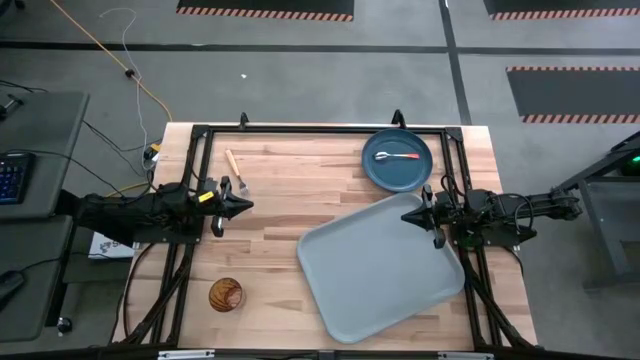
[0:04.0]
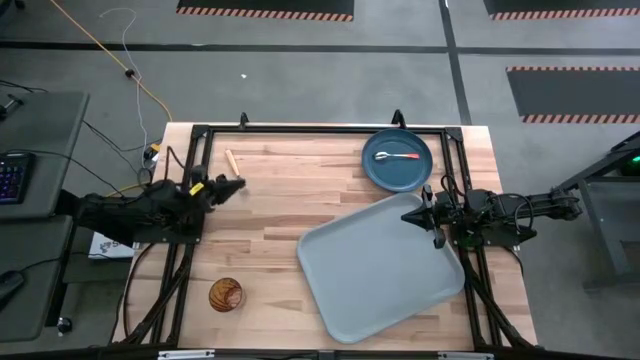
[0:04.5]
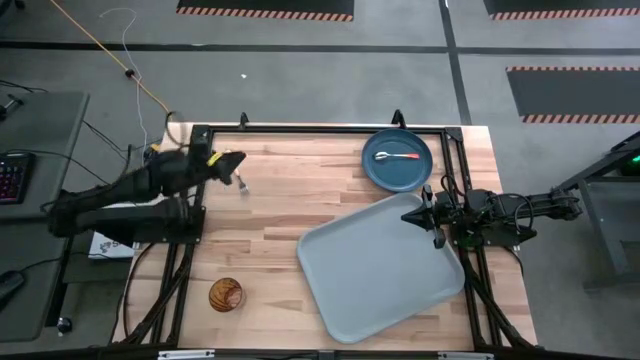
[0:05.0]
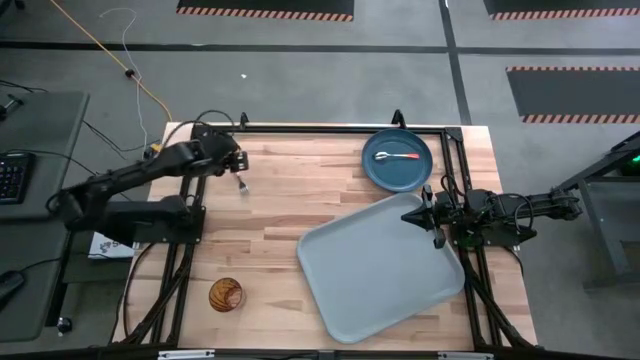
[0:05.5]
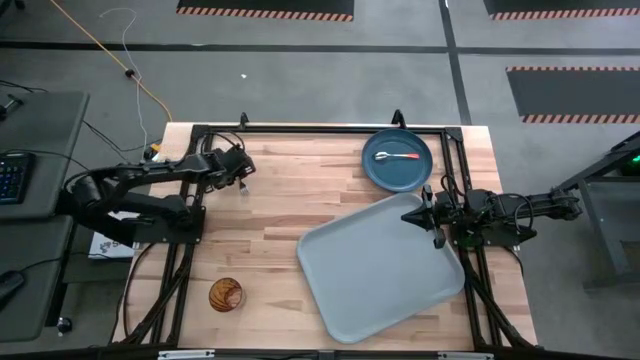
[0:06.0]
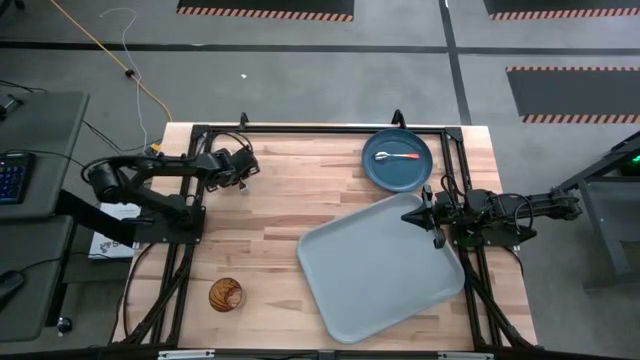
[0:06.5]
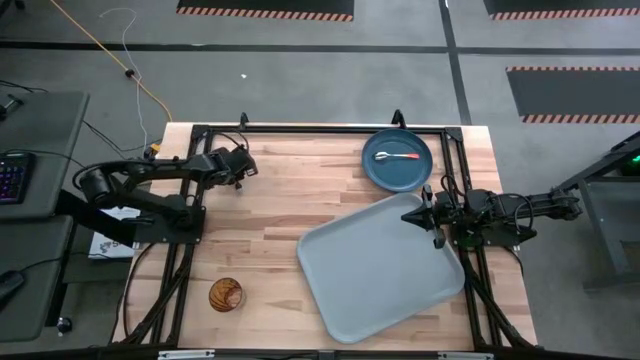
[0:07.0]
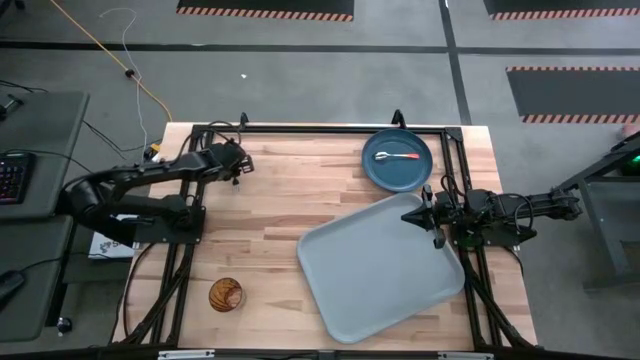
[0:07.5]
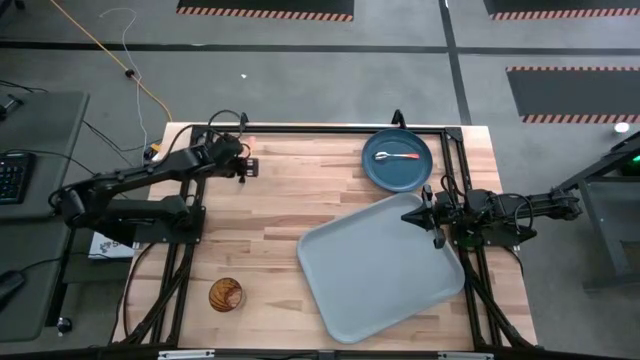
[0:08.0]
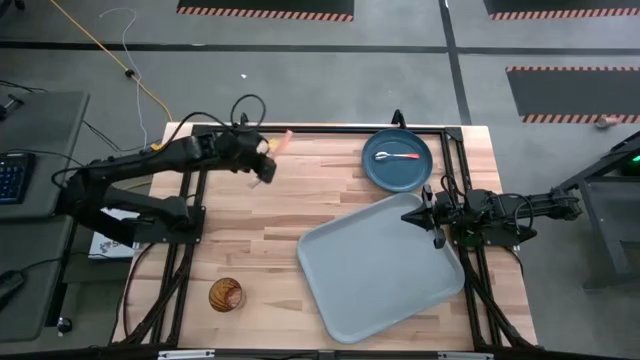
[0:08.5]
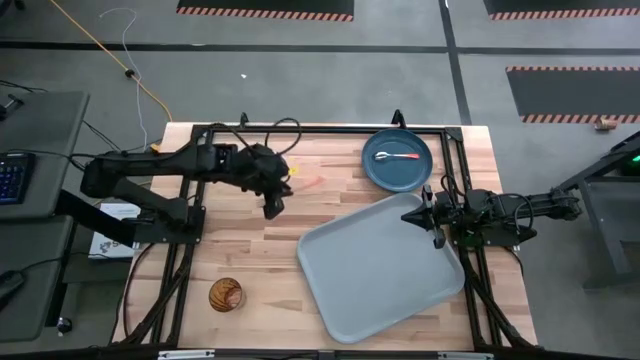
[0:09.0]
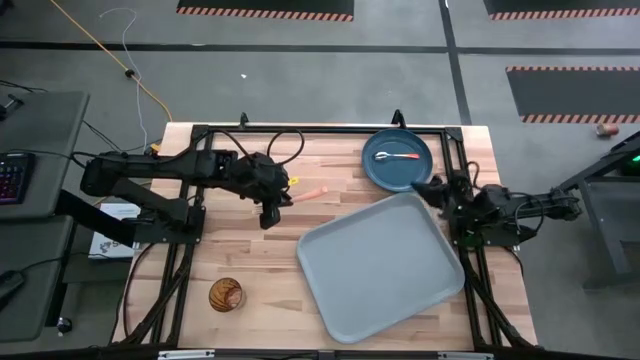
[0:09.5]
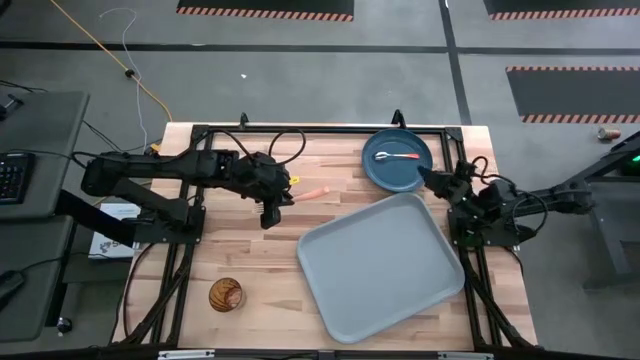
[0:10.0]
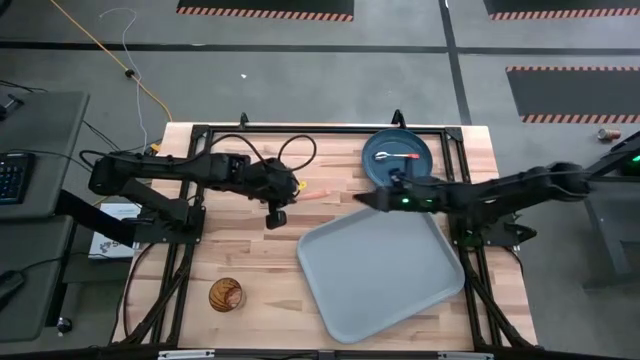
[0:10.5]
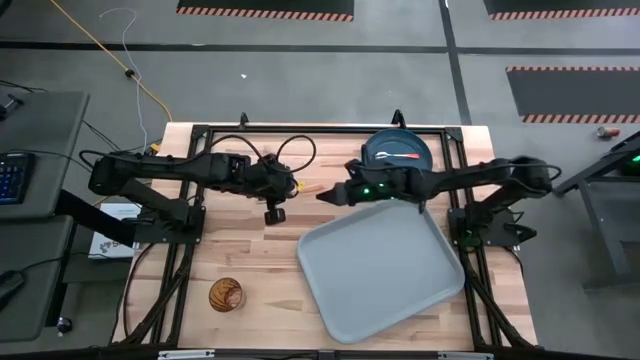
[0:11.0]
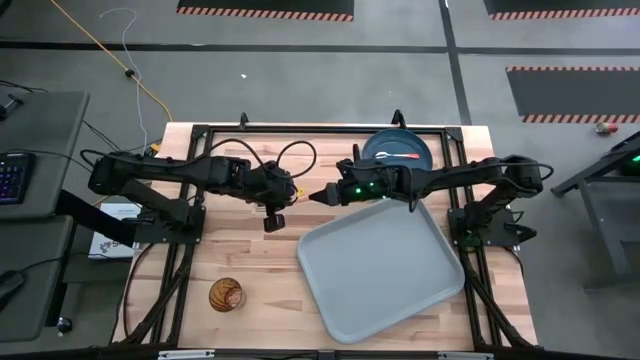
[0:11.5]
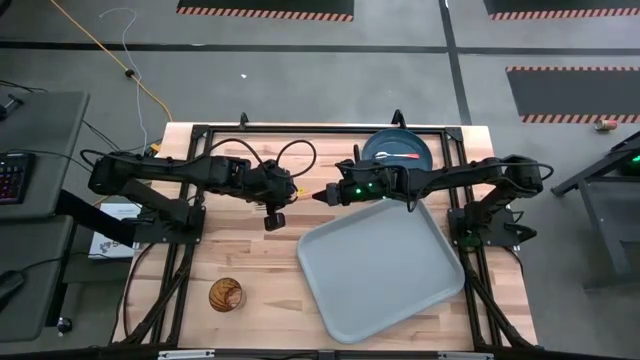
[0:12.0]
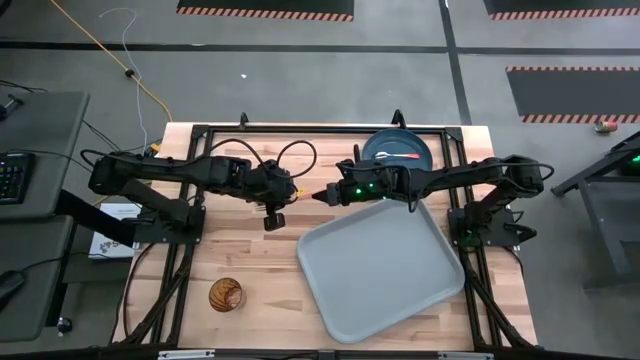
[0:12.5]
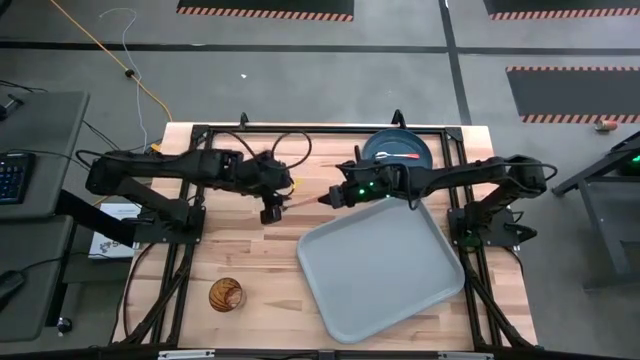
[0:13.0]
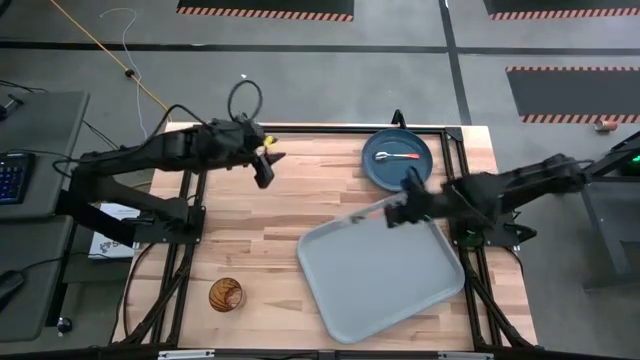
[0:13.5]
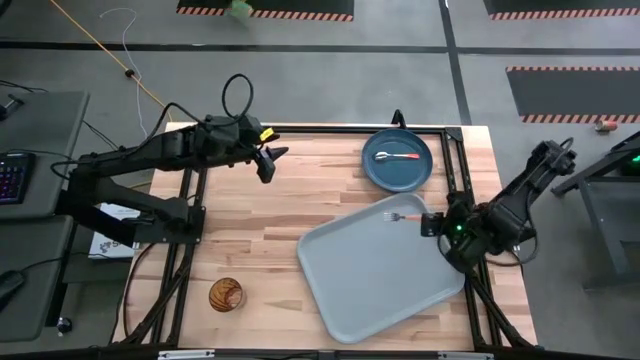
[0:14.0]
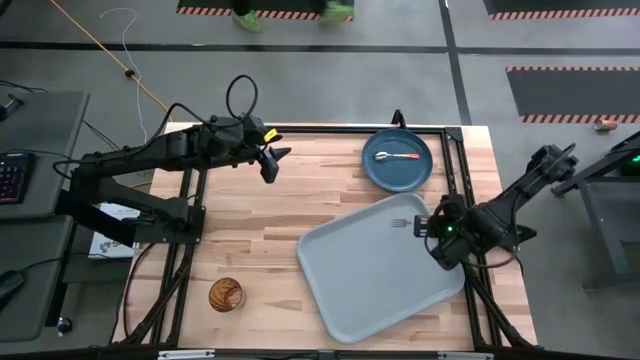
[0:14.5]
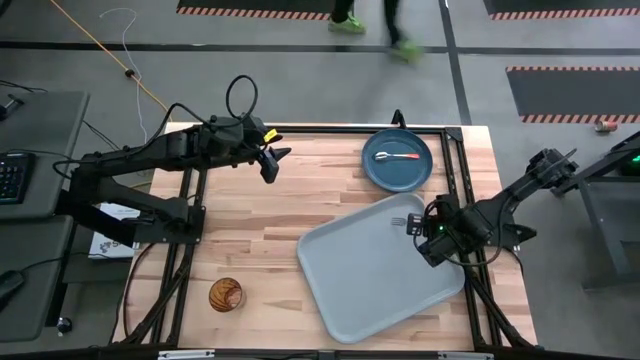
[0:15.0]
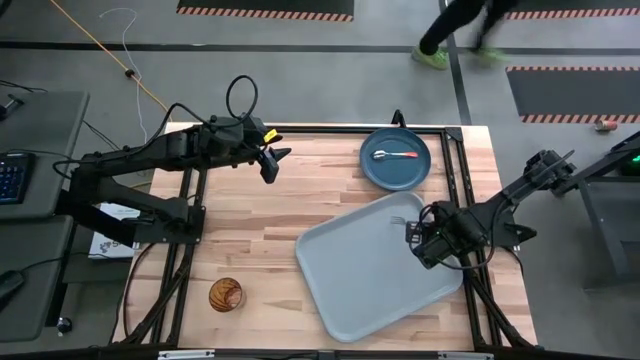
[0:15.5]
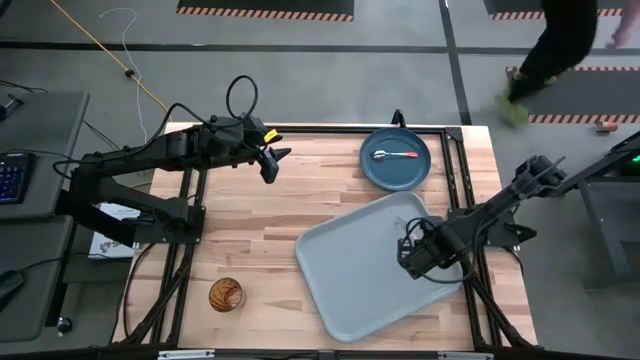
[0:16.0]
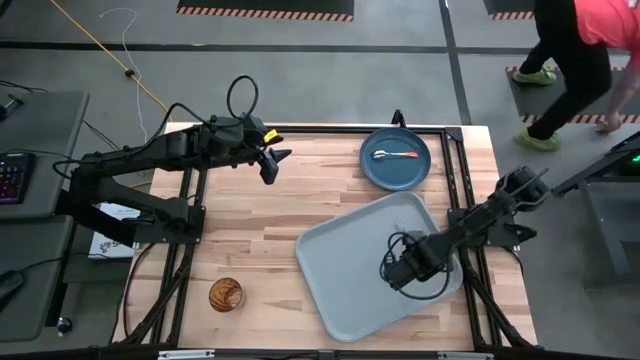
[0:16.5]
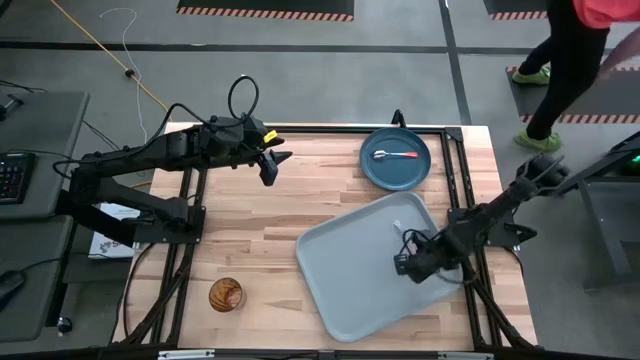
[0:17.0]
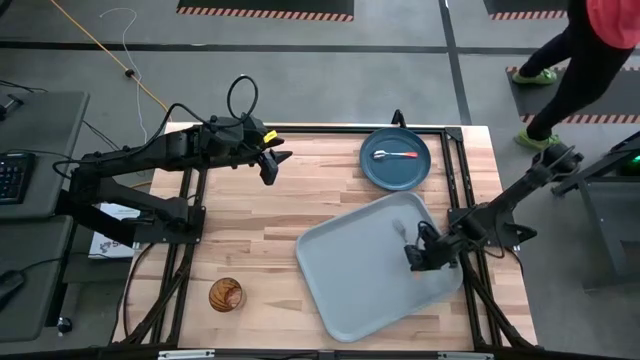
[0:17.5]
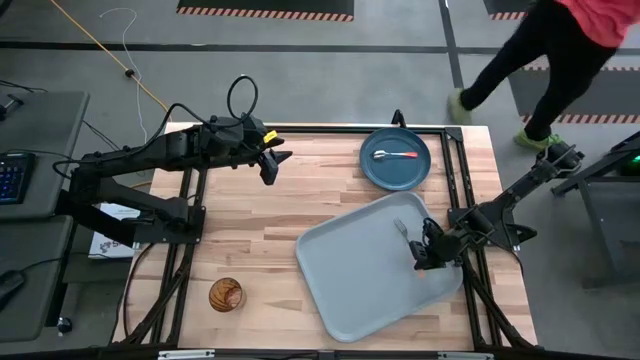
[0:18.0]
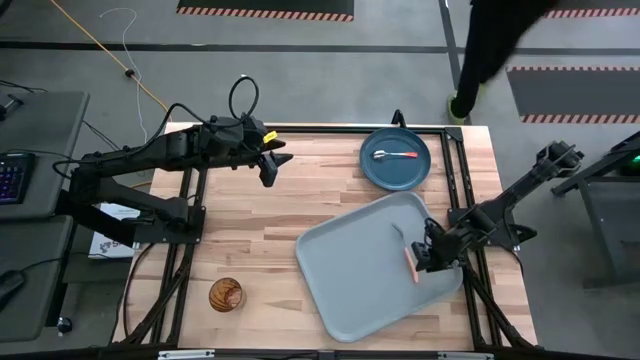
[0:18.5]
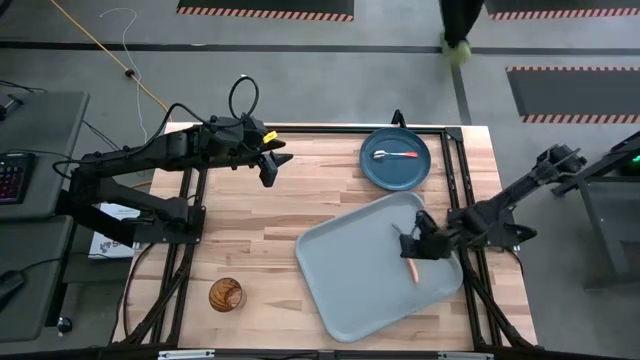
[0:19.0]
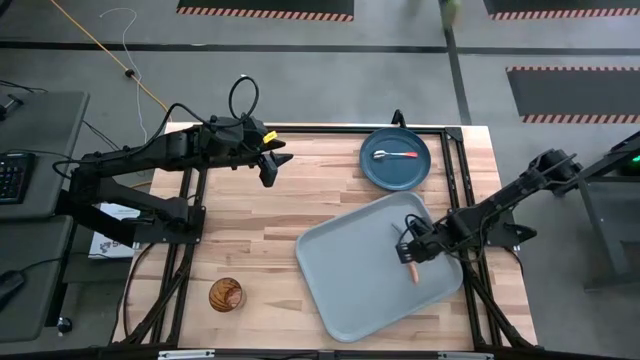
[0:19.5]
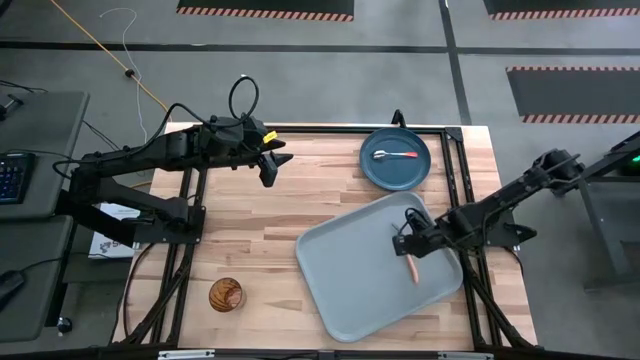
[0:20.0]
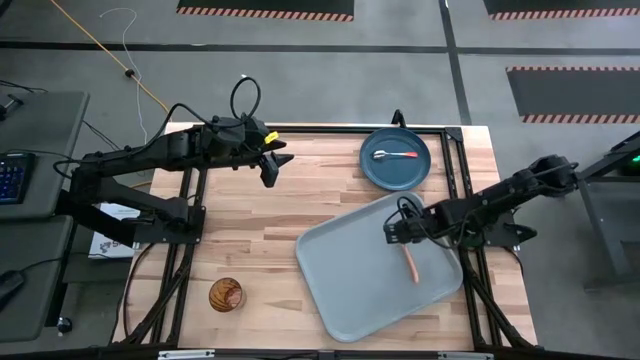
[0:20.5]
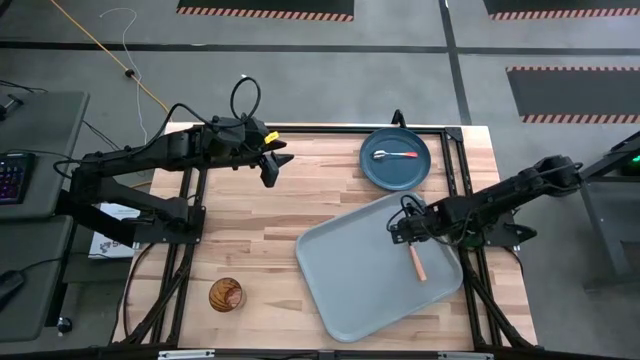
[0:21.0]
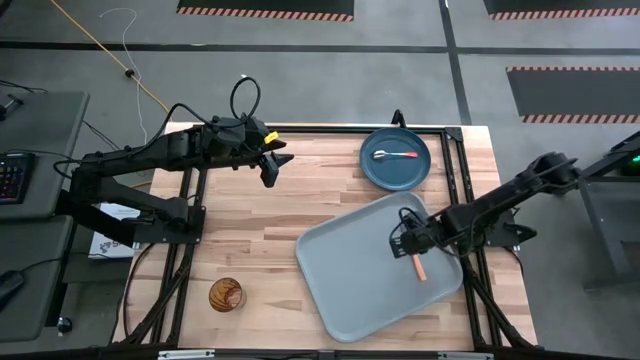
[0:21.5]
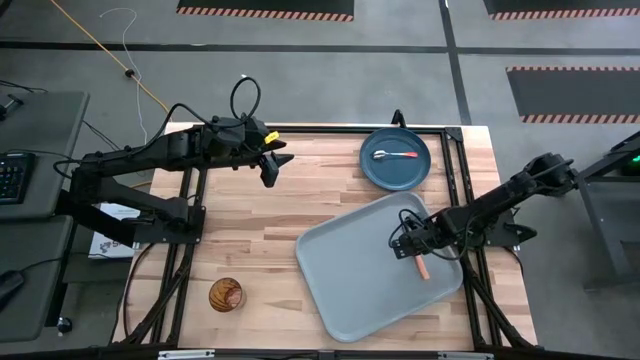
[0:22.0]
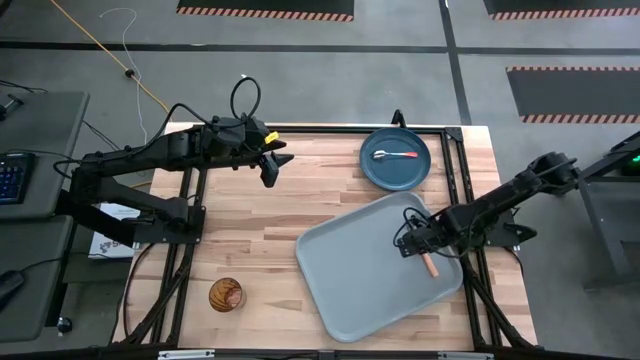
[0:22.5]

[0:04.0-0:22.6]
Task: Pick and place plate/cup/fork/spoon on tray
Put the light brown fork to the right of the gray tray
